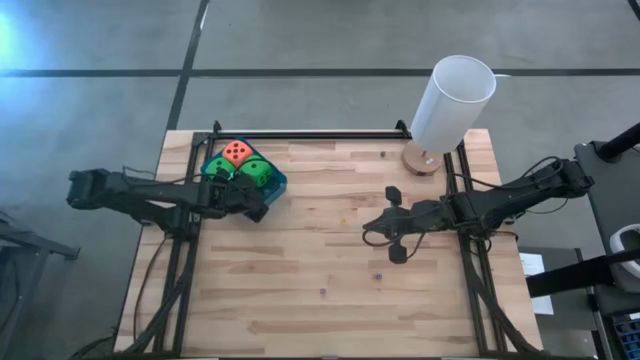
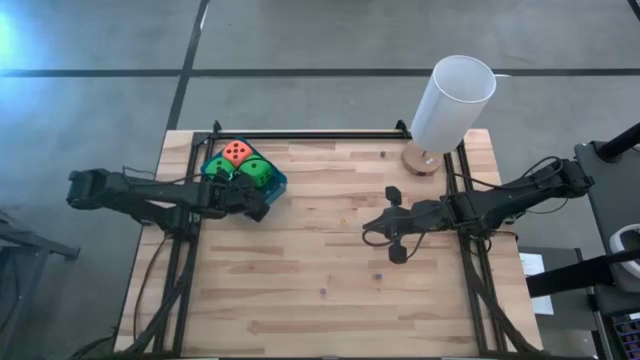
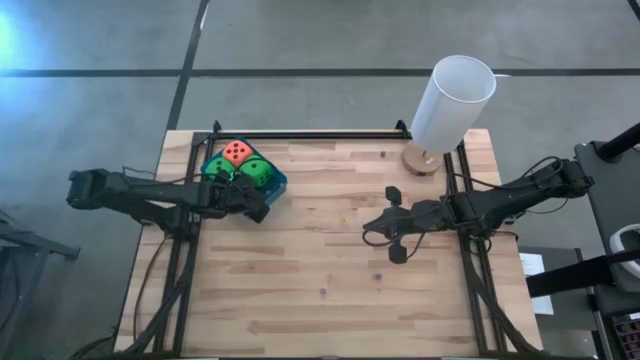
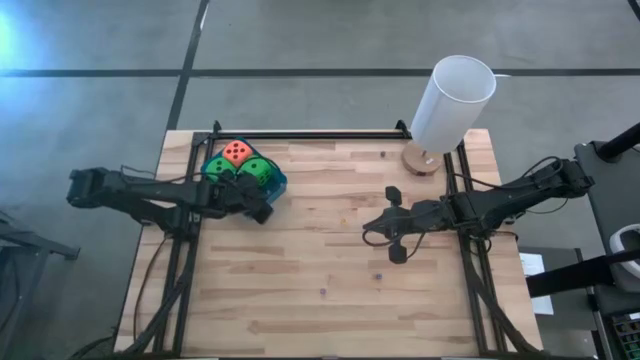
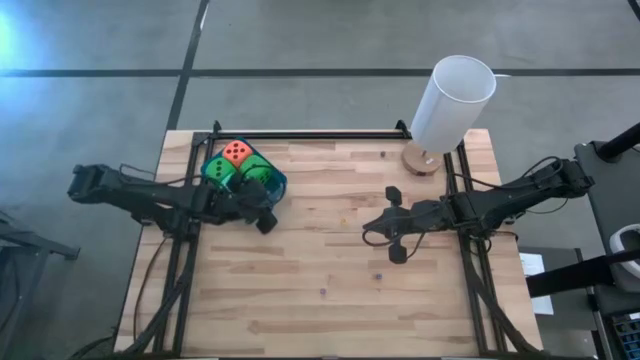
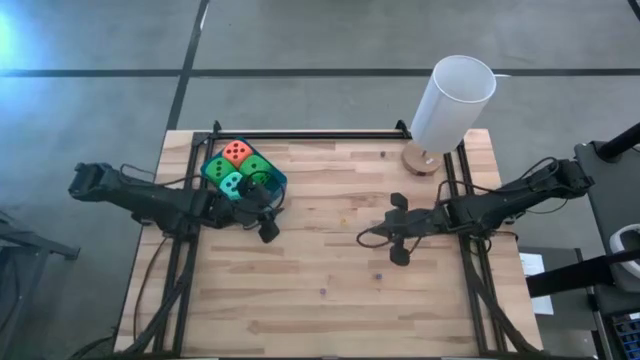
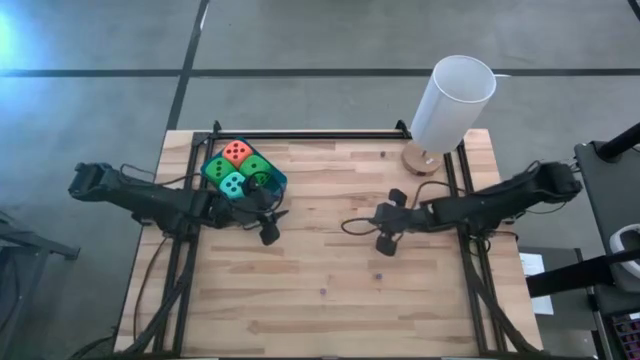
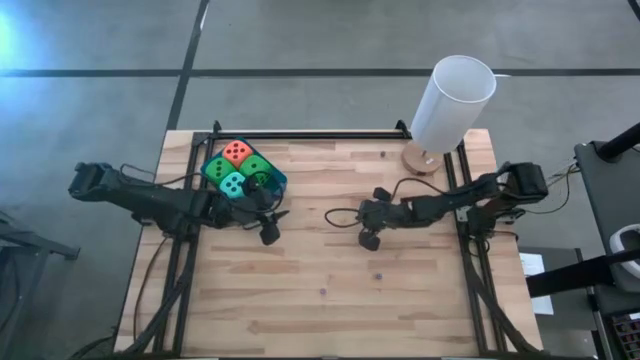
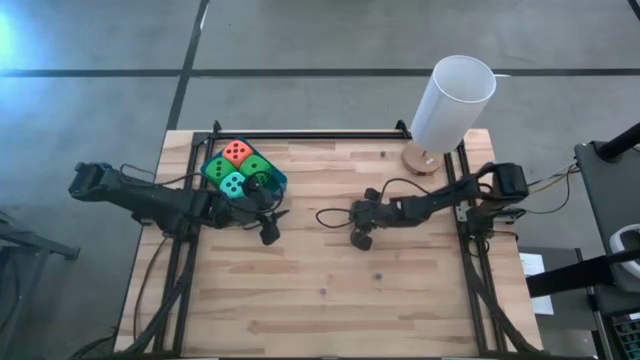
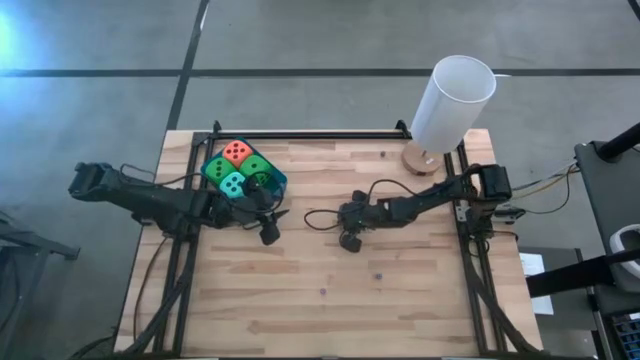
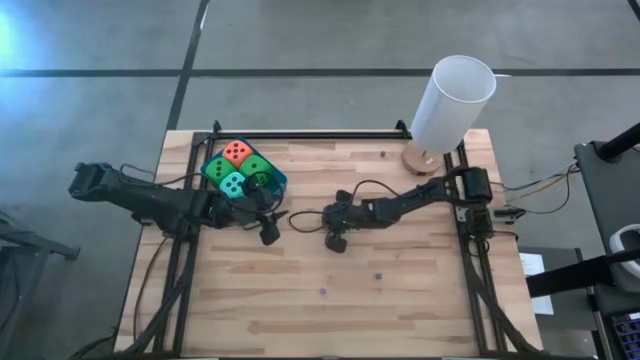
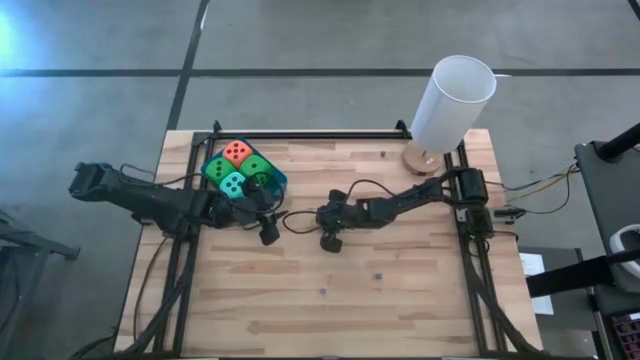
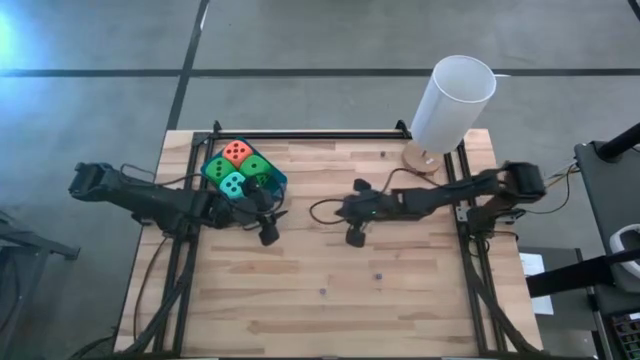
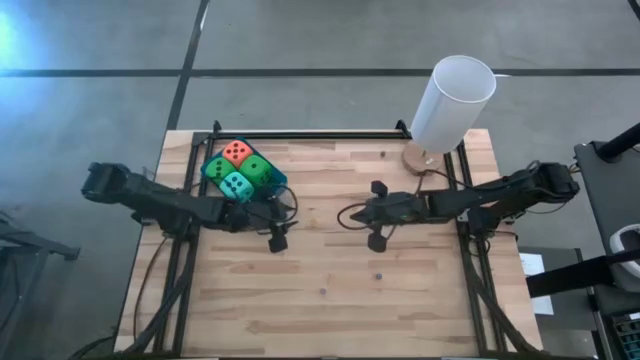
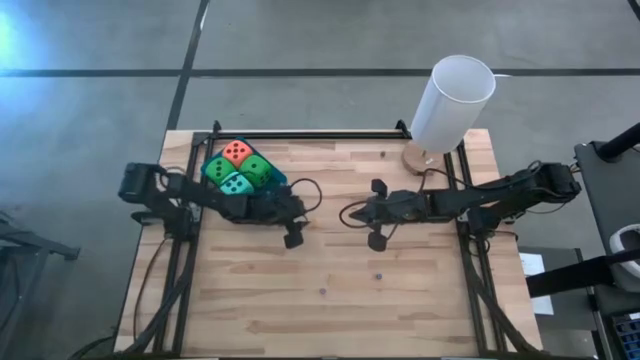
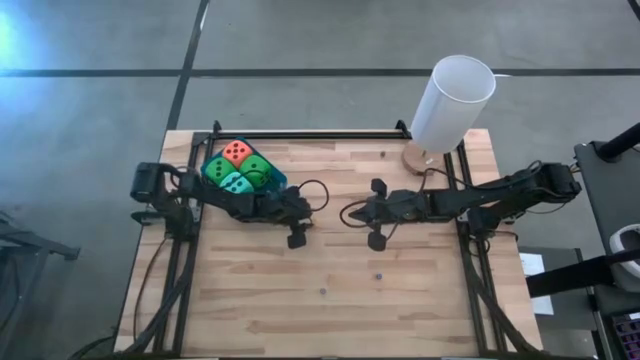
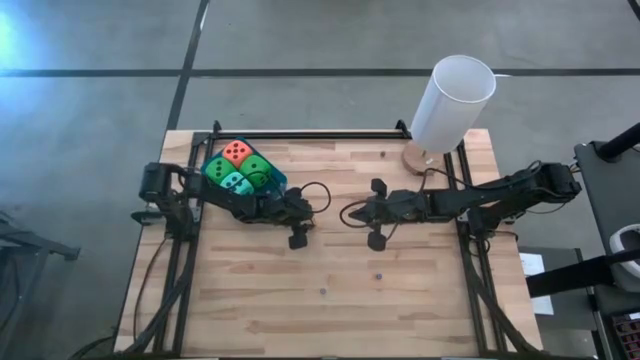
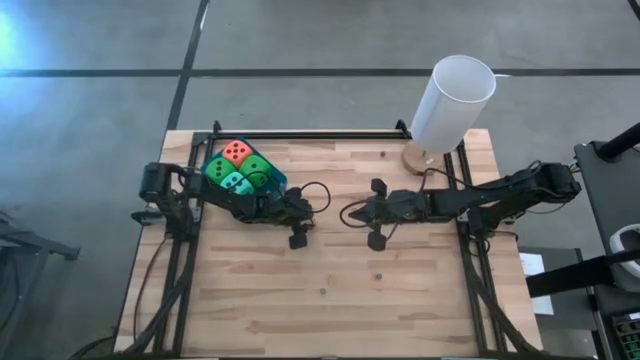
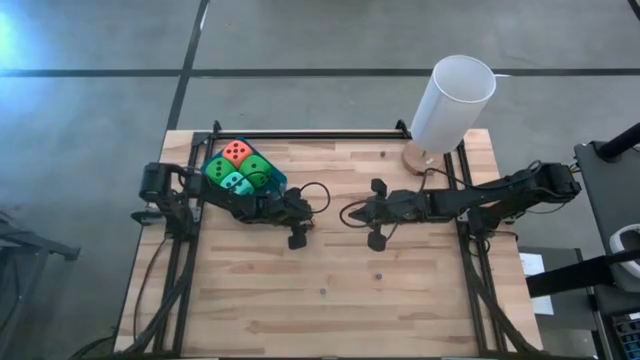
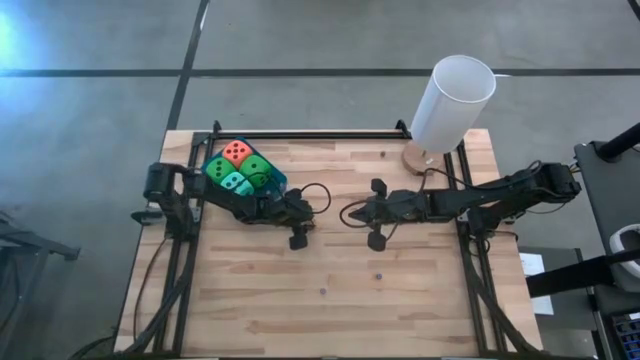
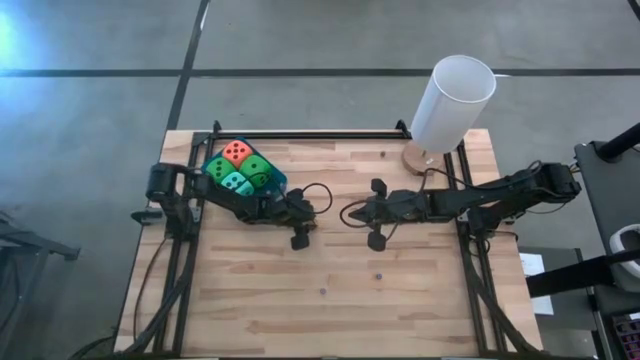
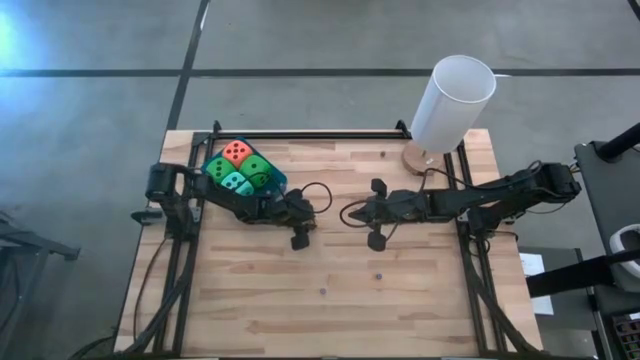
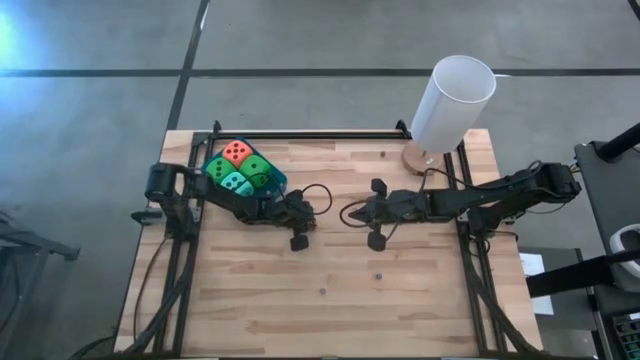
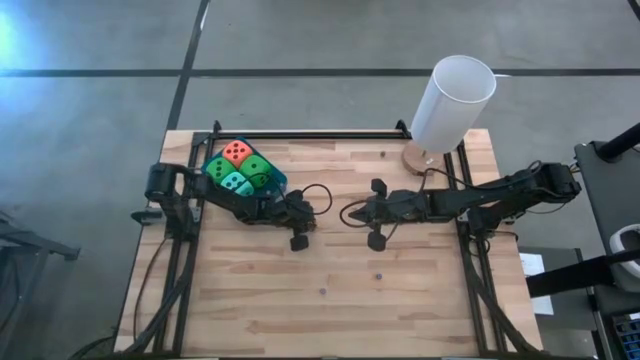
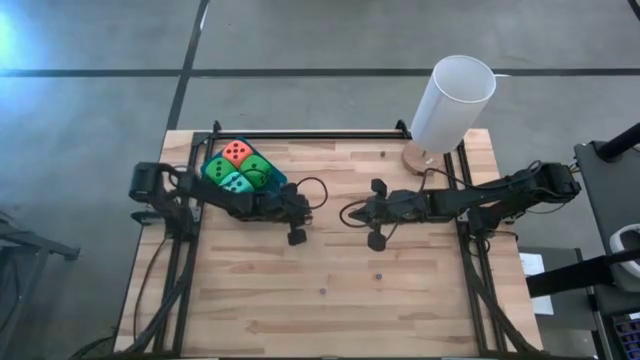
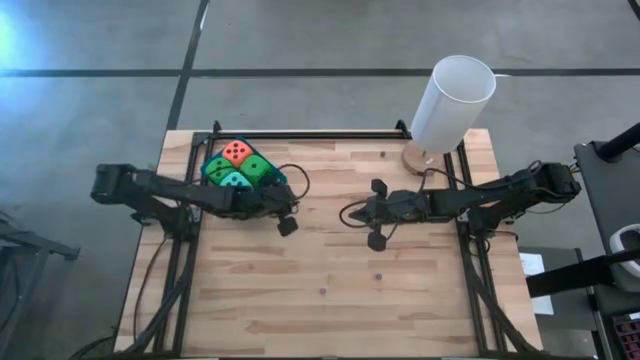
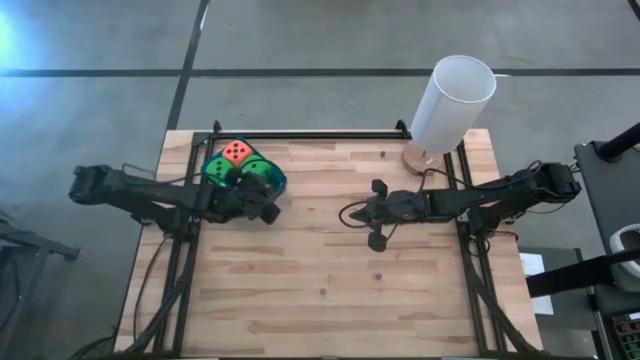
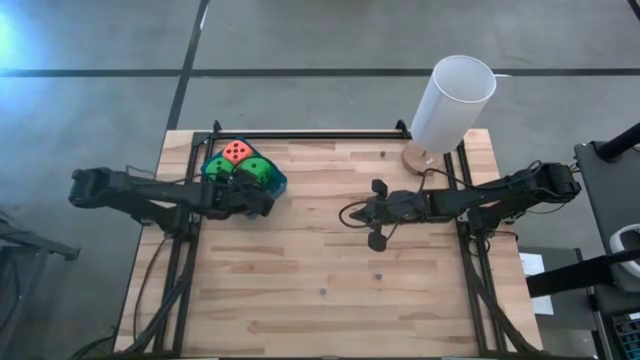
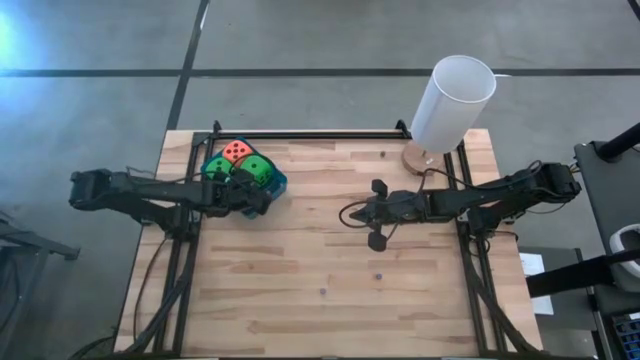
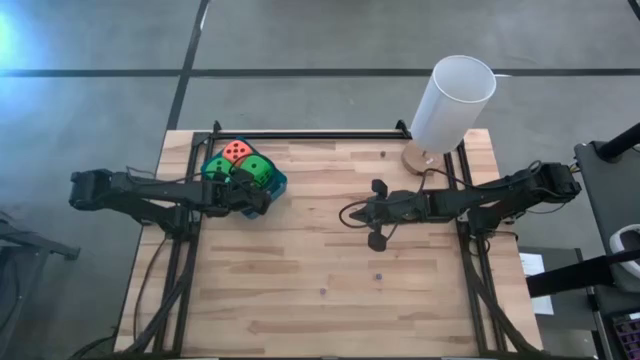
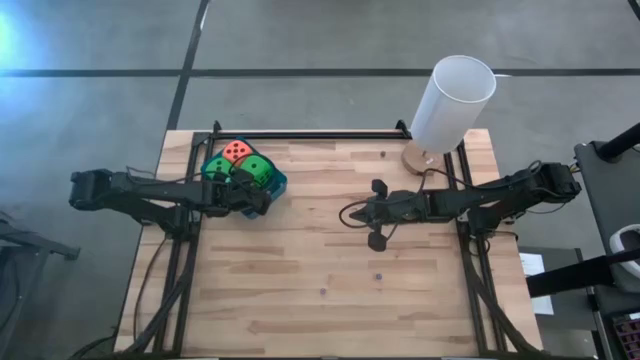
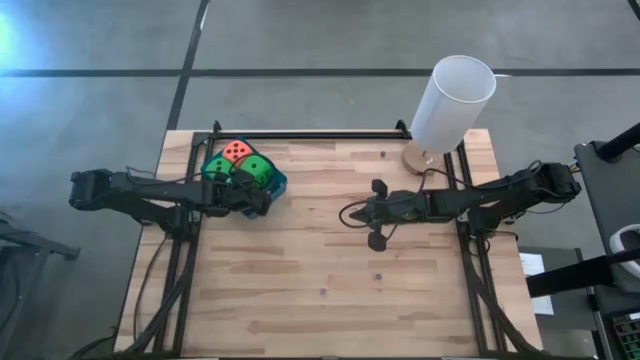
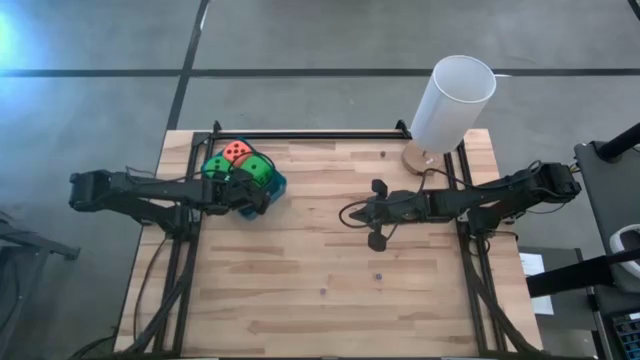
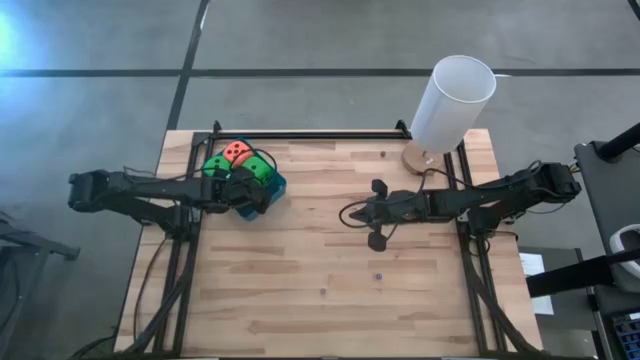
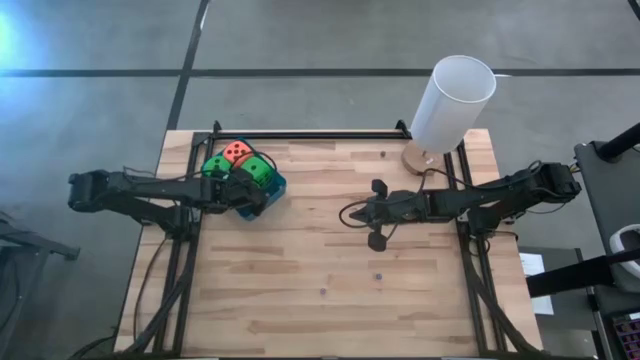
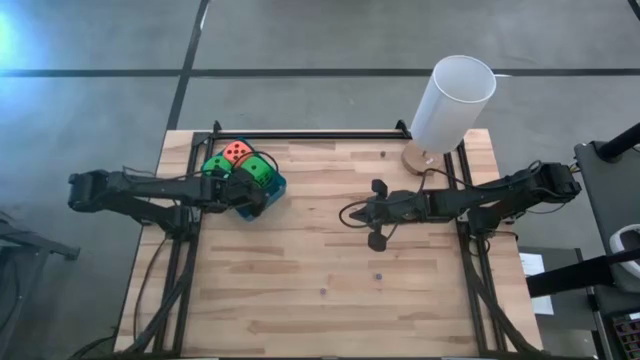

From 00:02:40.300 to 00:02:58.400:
Task: Pick & Place Dice
Put the small yellow dice into the blue bin

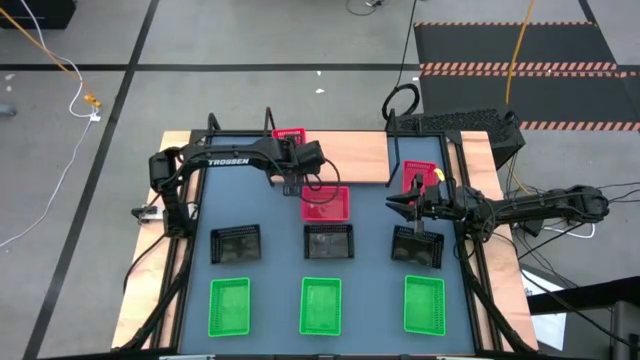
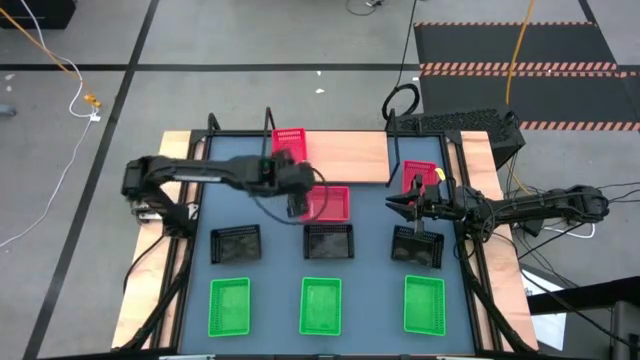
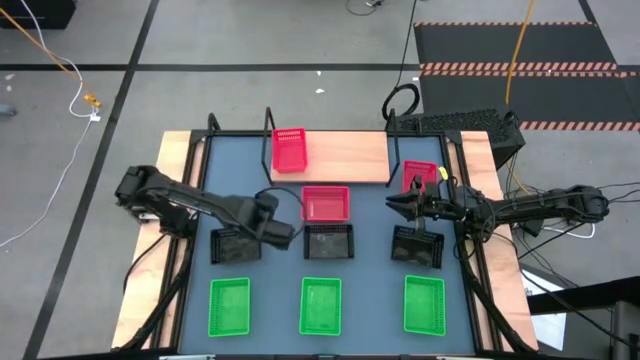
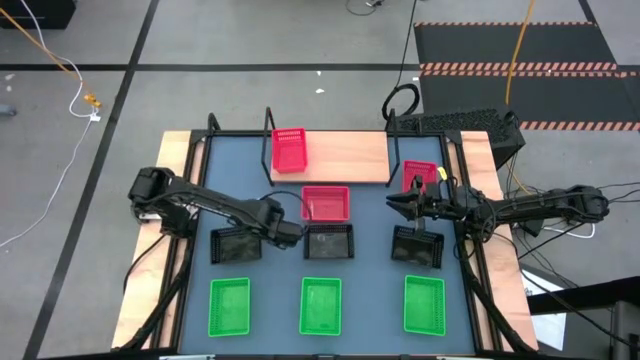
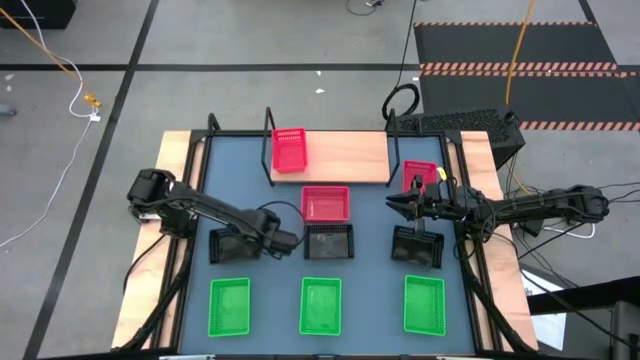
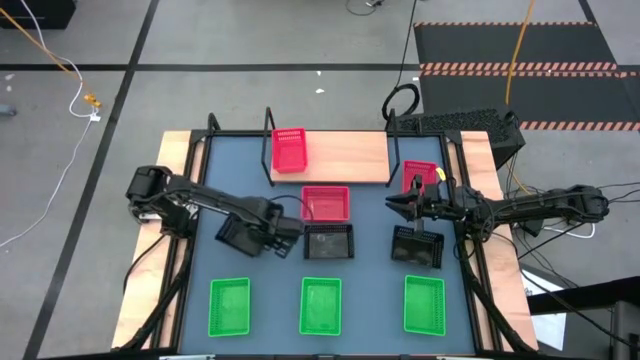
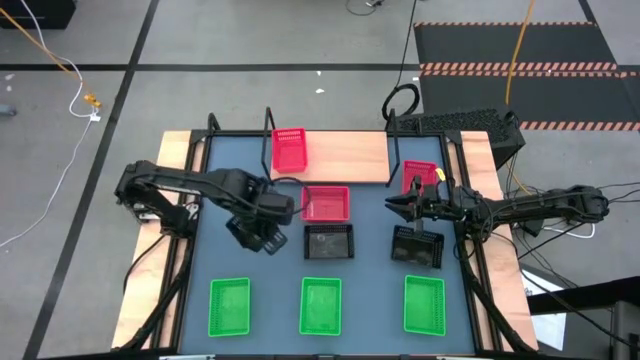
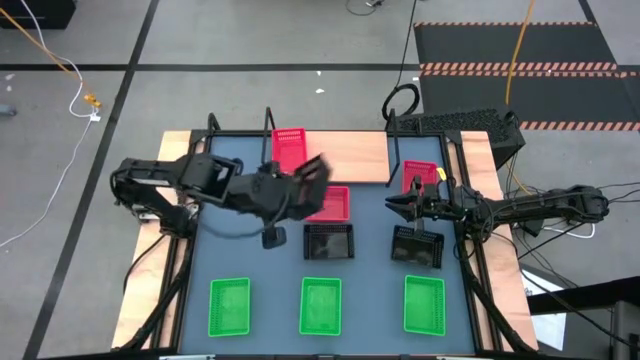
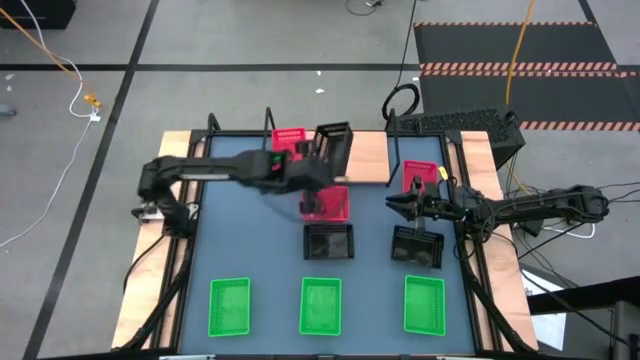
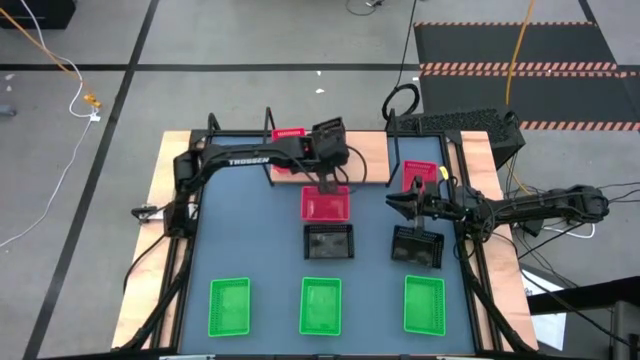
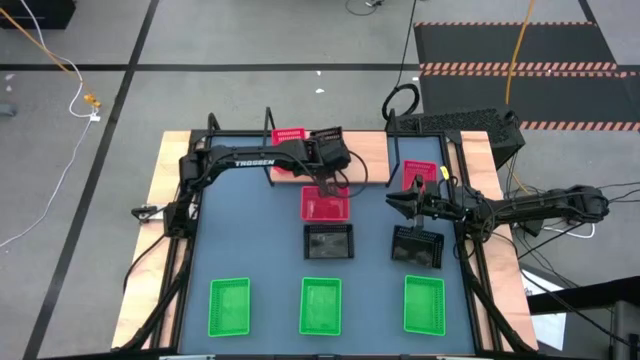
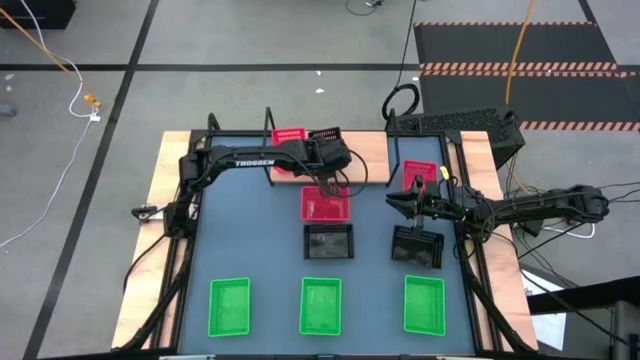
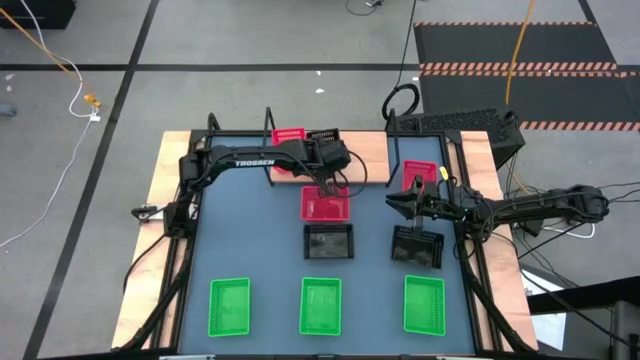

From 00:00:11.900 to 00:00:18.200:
Task: Stack baskets on shelf by color
Put the left black basket on the shelf
